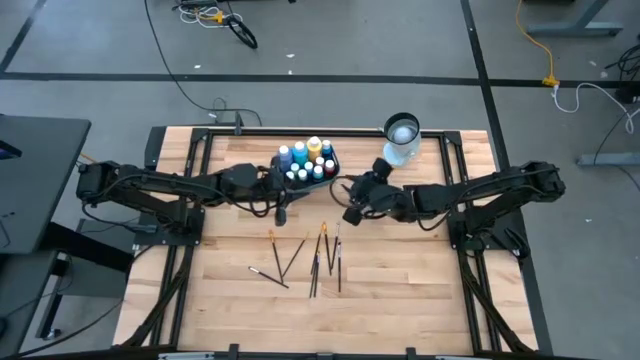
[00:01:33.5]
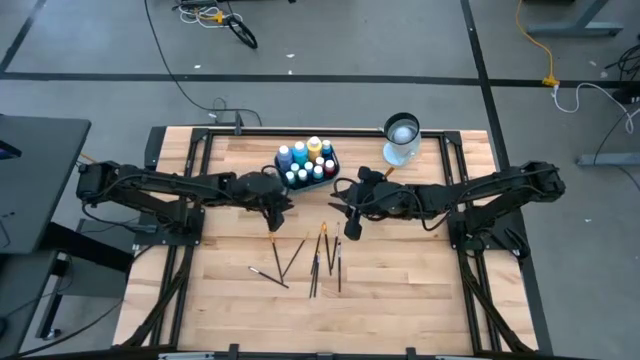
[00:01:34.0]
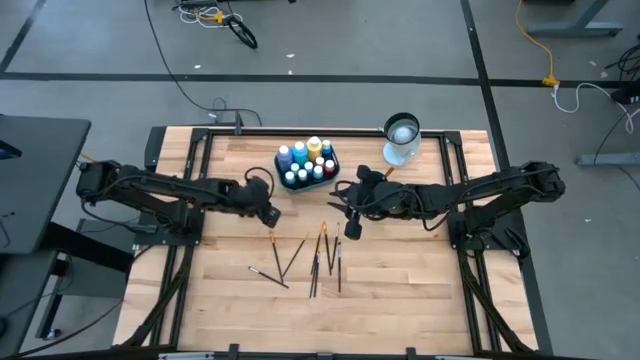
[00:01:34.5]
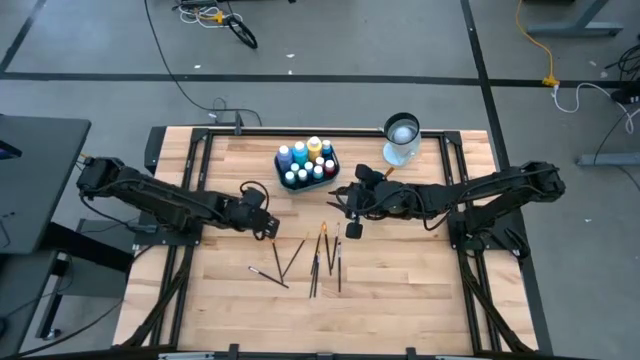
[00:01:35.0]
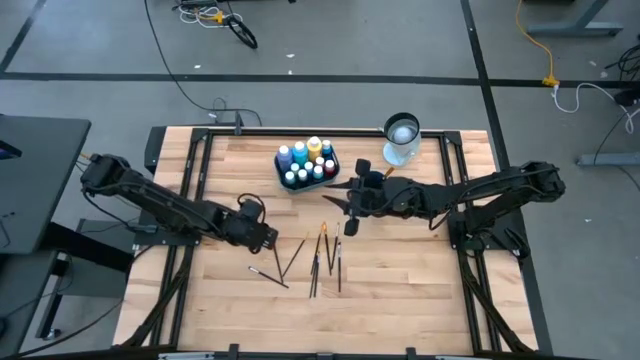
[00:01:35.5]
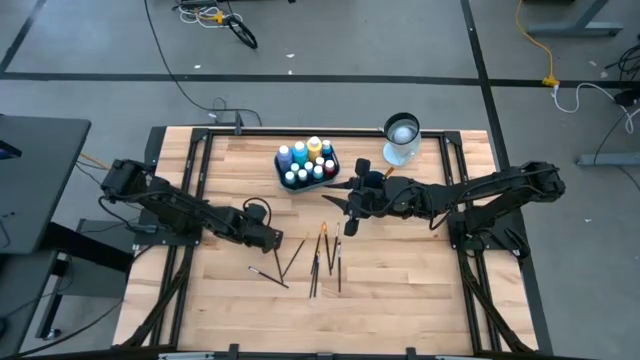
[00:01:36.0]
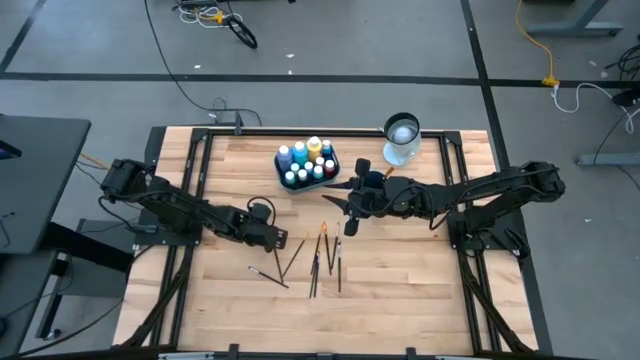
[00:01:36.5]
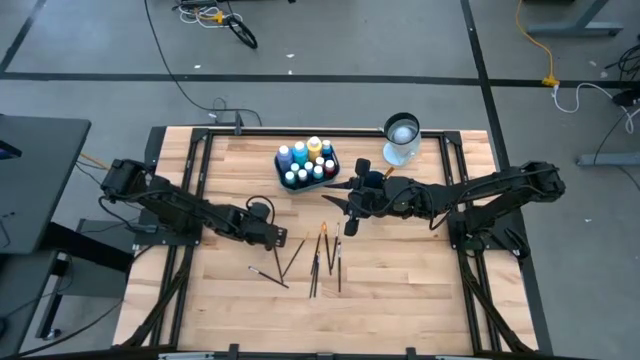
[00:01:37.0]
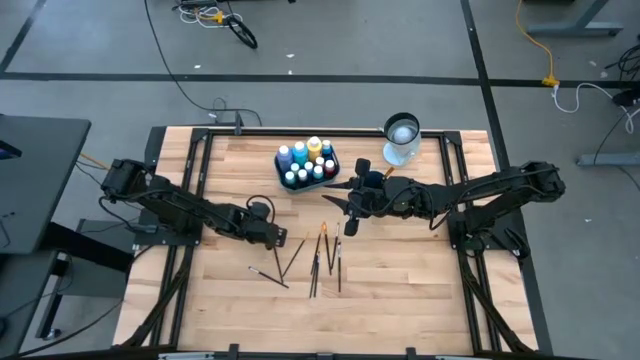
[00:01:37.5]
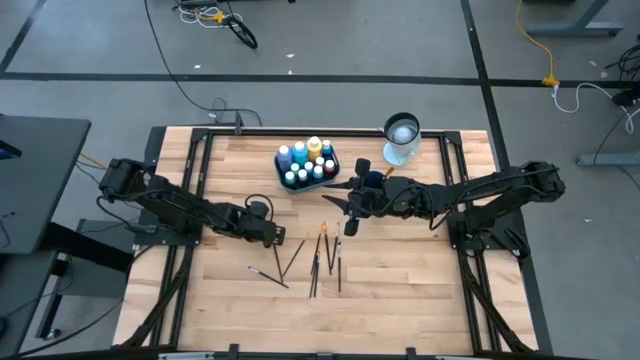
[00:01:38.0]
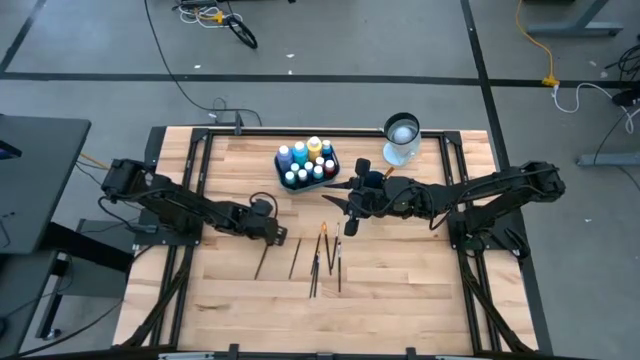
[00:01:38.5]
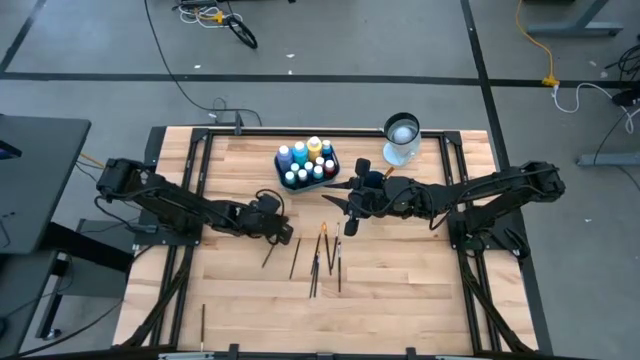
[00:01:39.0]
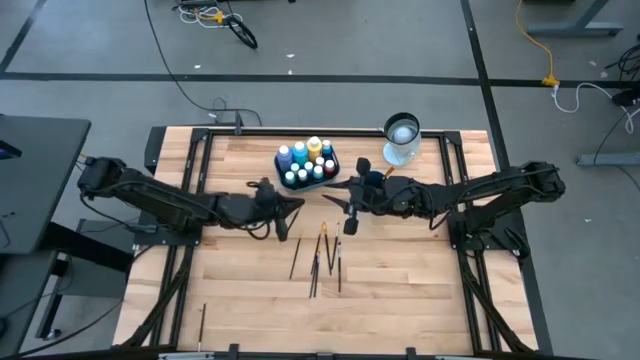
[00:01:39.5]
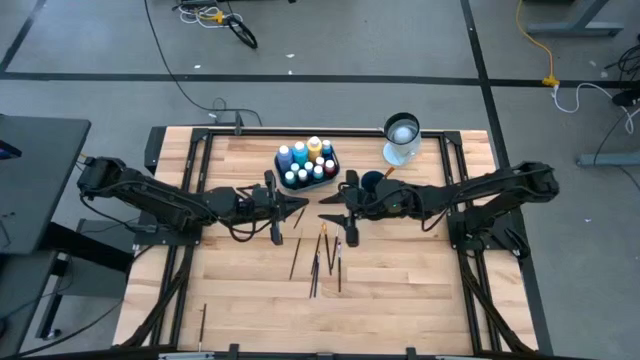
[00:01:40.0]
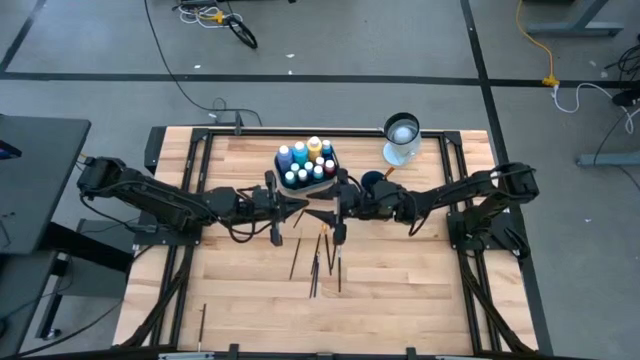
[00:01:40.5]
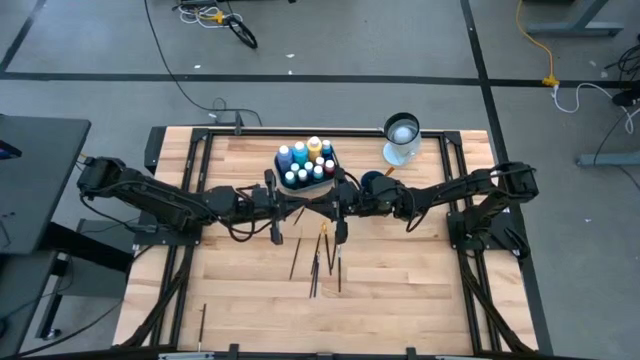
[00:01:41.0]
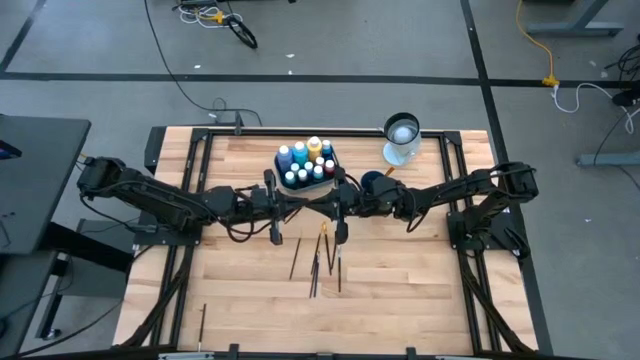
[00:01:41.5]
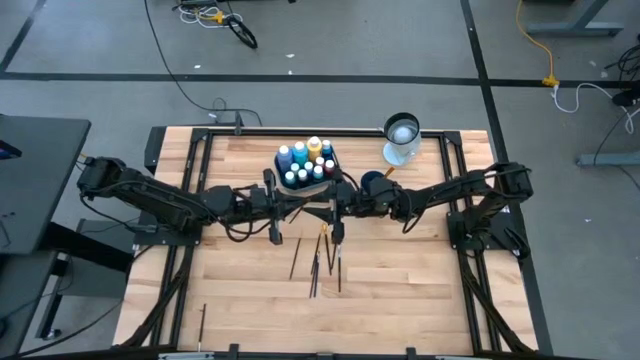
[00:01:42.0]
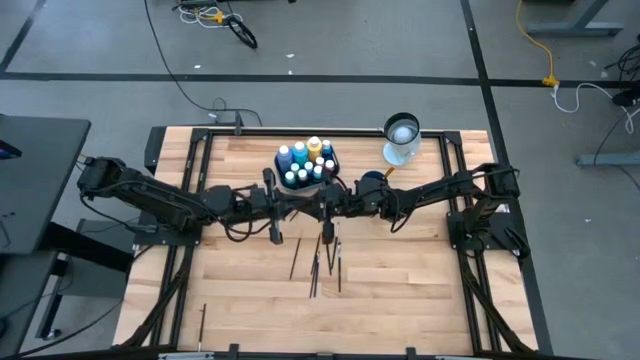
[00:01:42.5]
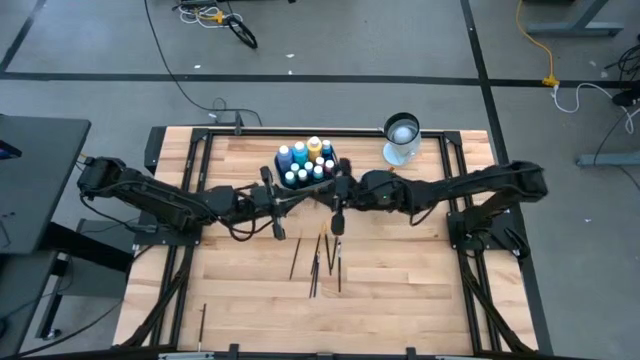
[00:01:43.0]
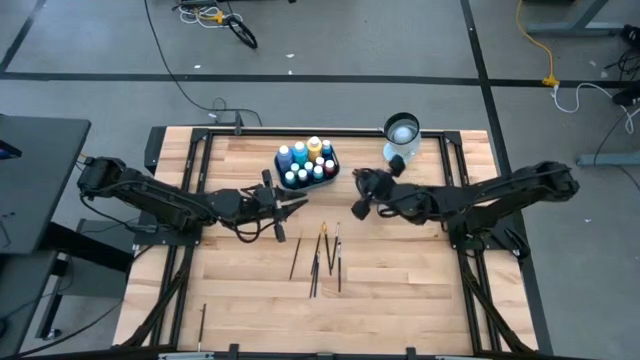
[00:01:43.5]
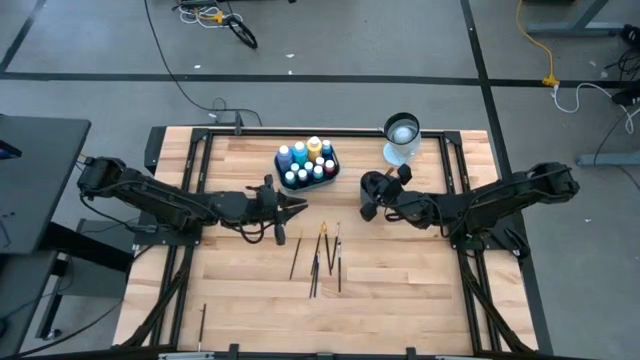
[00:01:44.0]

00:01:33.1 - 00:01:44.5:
Task: Pick & Place Paint Supplies
Put the gold paint brush into the blue cup

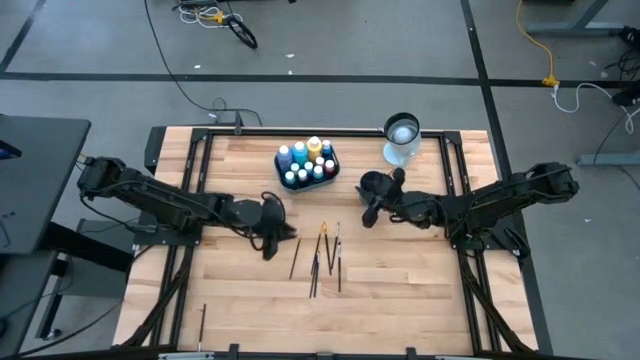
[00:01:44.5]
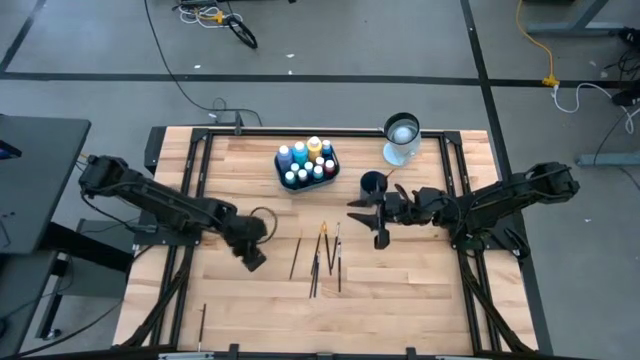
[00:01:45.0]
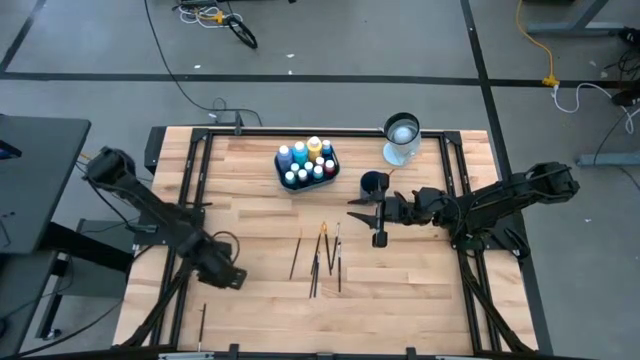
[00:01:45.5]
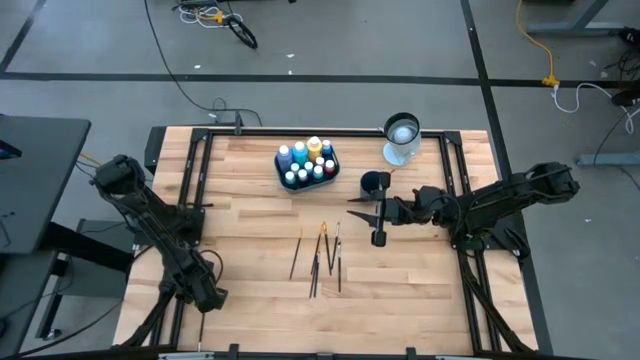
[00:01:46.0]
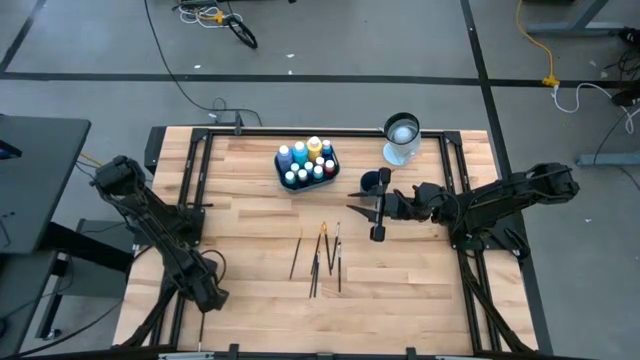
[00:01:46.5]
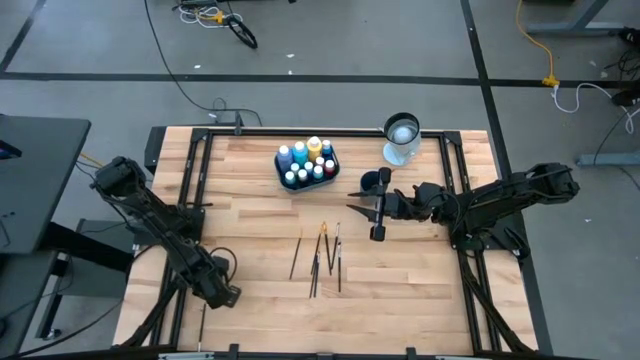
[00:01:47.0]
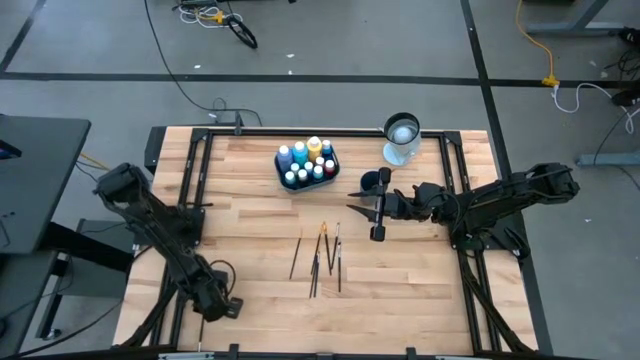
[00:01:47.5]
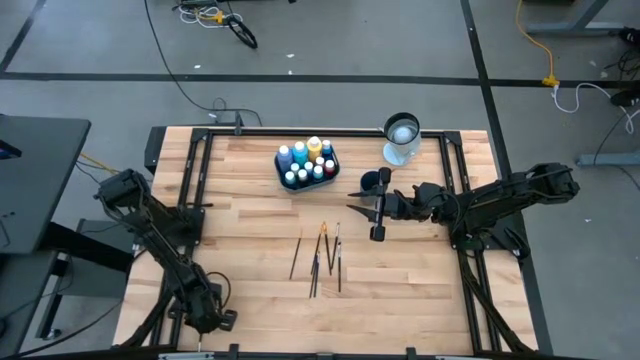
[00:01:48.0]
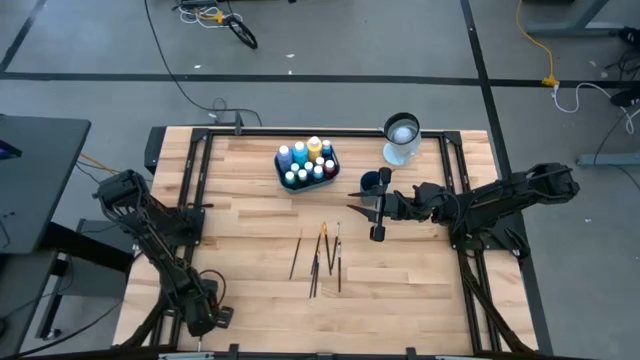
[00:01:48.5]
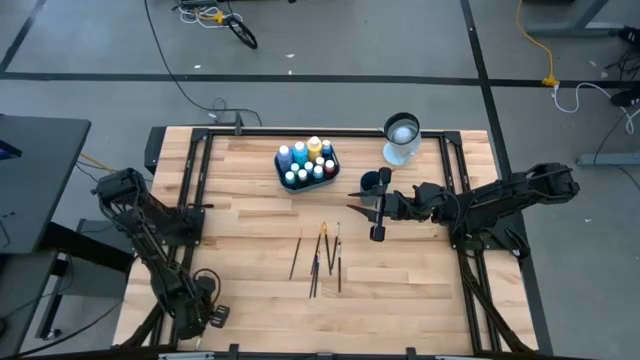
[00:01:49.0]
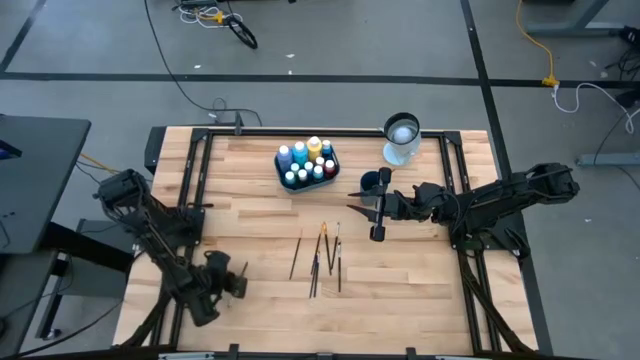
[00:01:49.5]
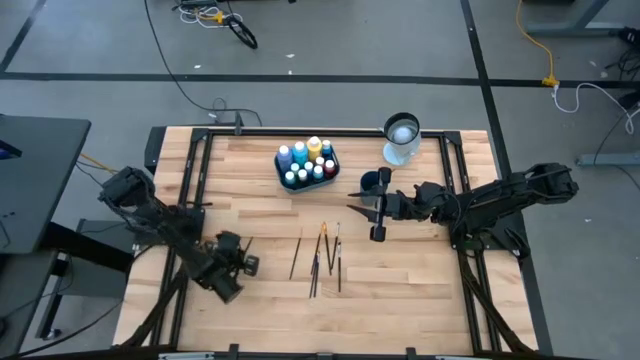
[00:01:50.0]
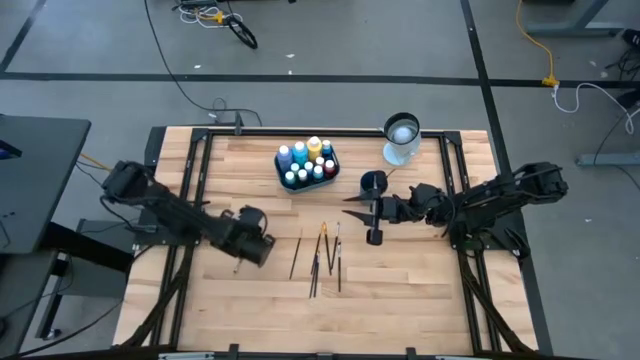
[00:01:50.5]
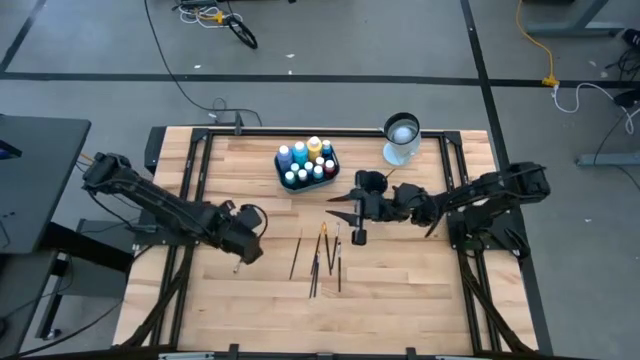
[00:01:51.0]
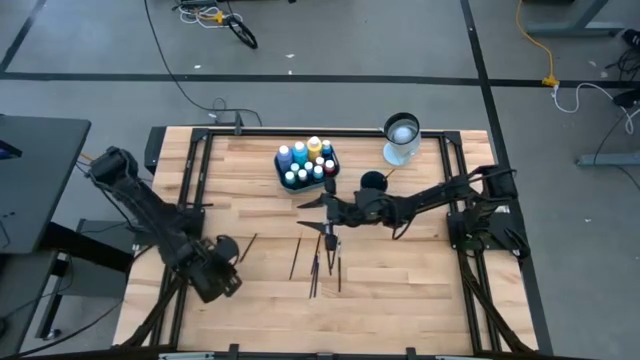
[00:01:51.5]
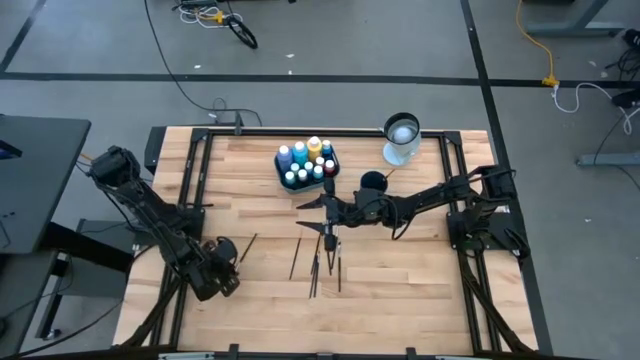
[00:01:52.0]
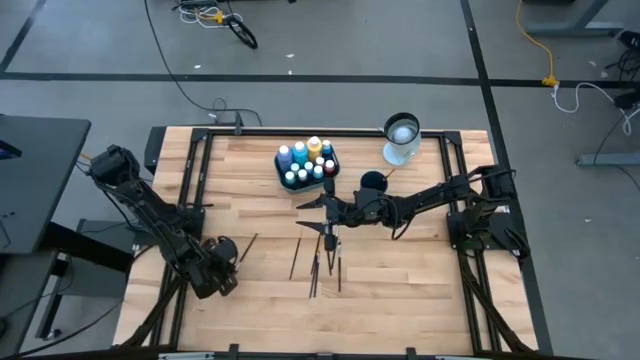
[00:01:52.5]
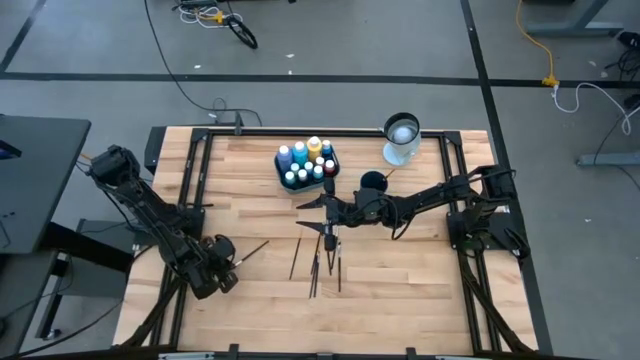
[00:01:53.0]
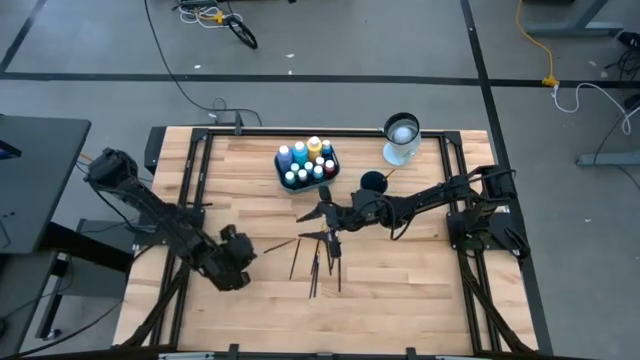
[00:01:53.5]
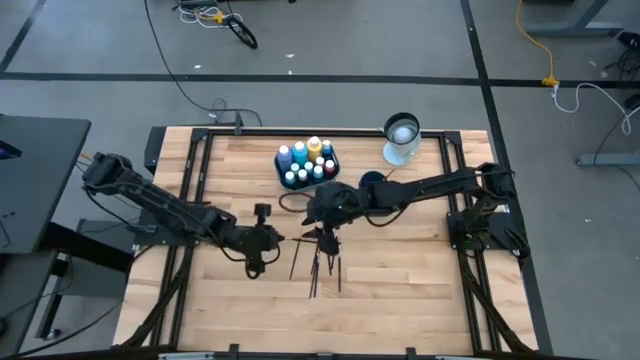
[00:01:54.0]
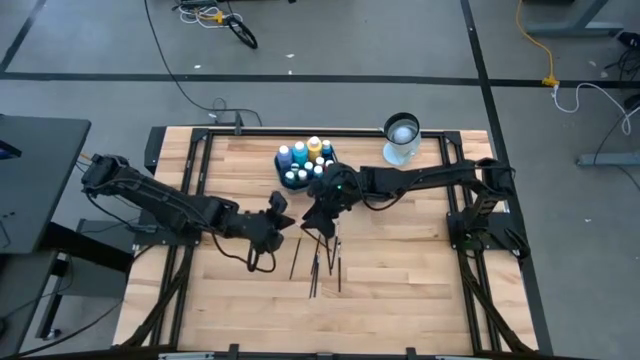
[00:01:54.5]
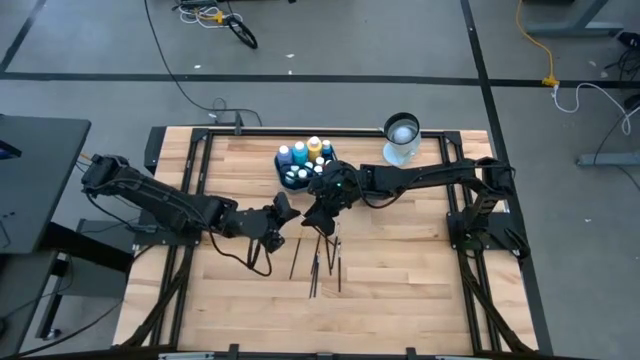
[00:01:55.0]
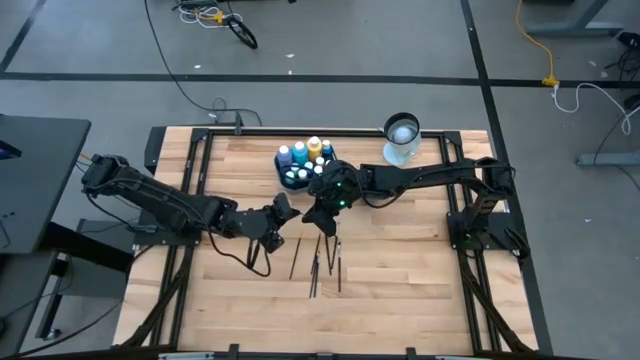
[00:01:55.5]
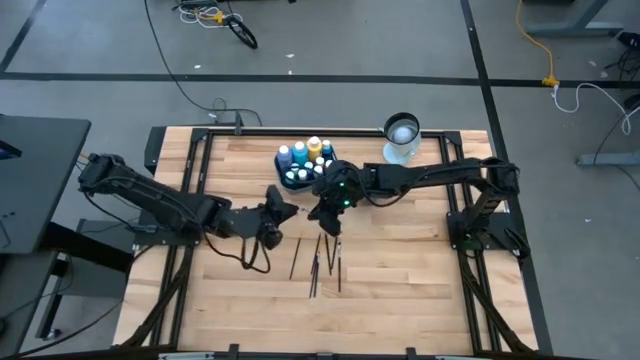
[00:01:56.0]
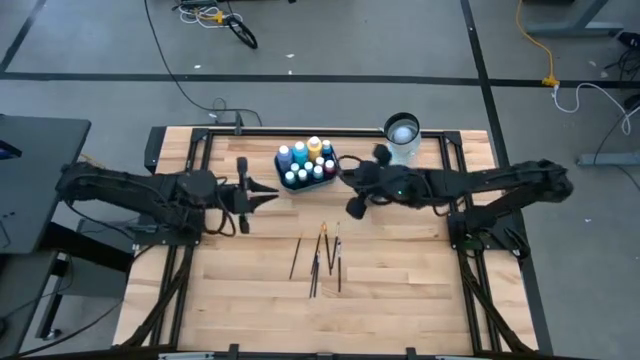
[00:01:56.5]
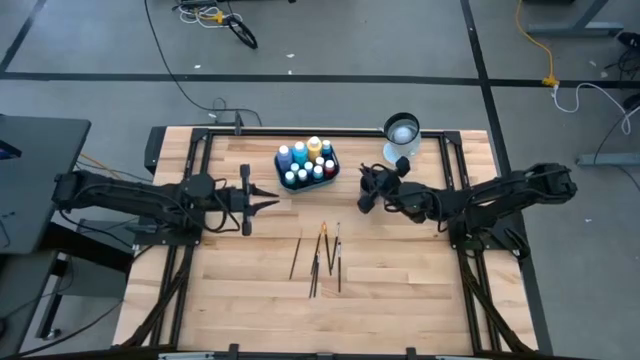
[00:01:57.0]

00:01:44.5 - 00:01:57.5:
Put the silver paint brush into the blue cup
